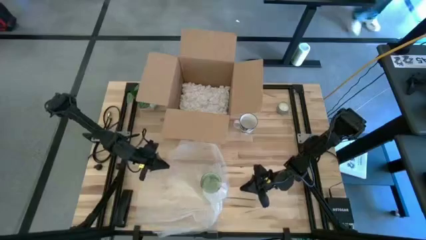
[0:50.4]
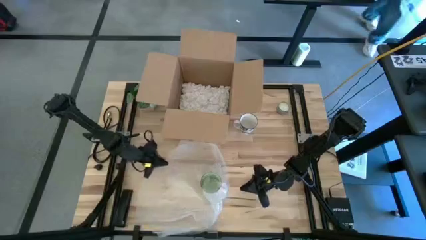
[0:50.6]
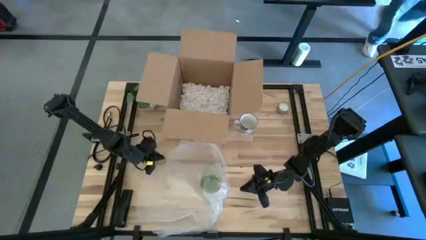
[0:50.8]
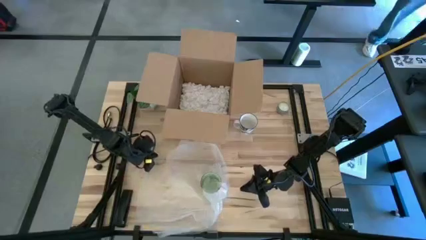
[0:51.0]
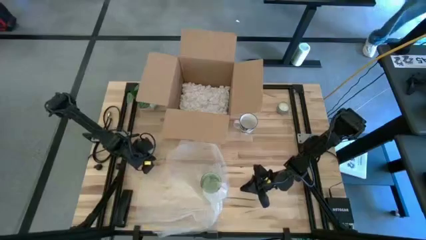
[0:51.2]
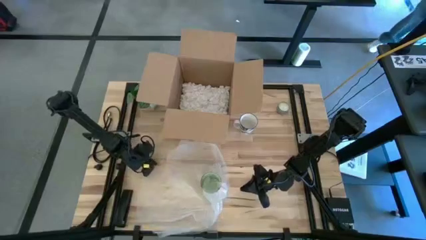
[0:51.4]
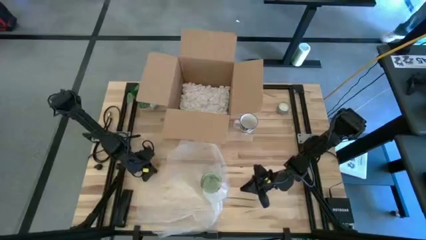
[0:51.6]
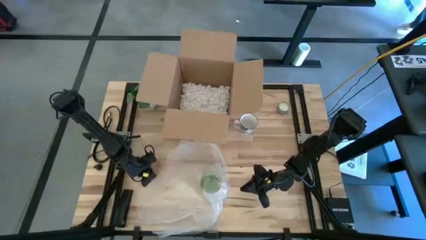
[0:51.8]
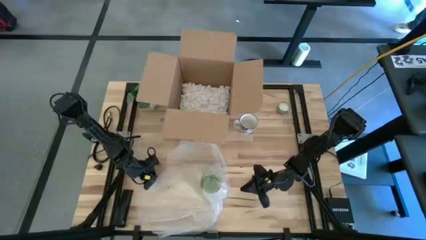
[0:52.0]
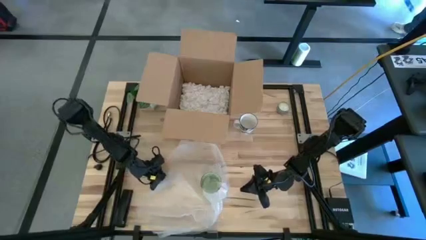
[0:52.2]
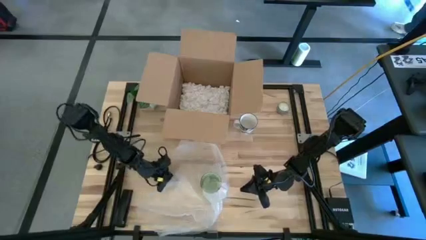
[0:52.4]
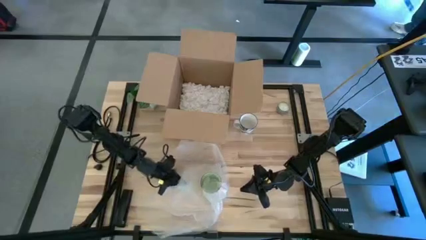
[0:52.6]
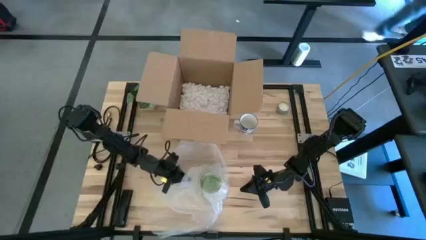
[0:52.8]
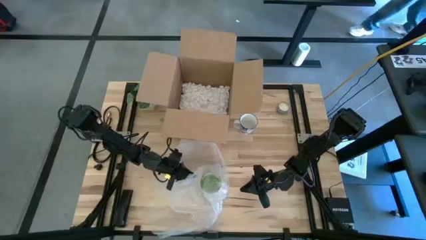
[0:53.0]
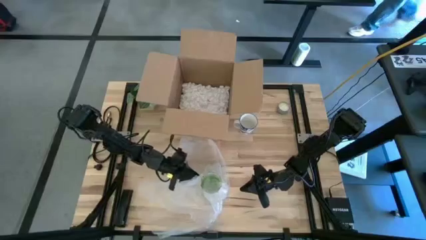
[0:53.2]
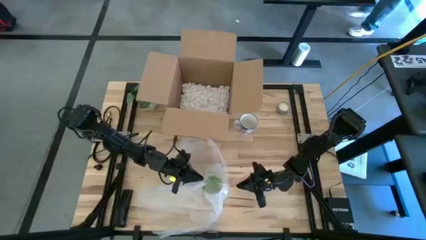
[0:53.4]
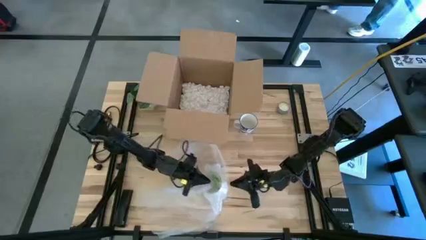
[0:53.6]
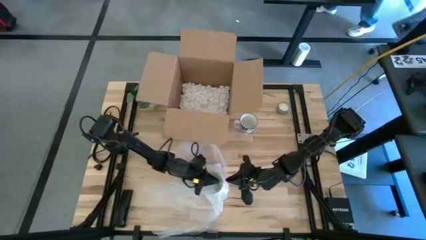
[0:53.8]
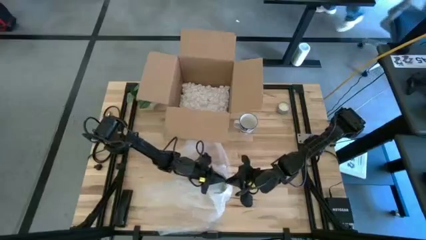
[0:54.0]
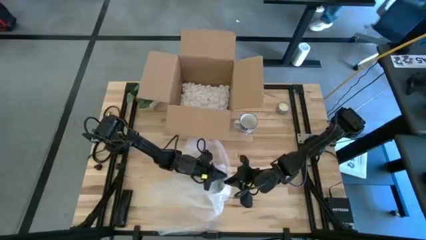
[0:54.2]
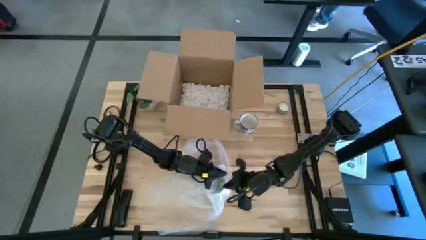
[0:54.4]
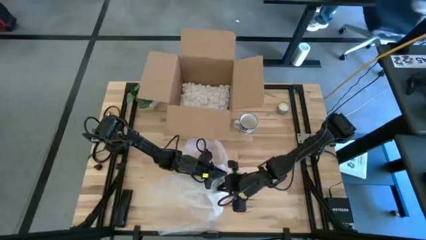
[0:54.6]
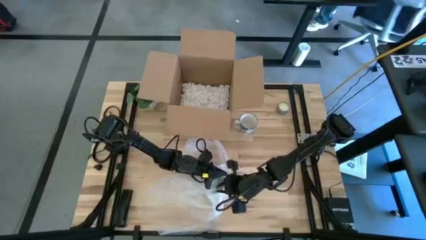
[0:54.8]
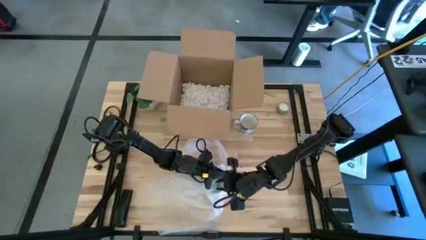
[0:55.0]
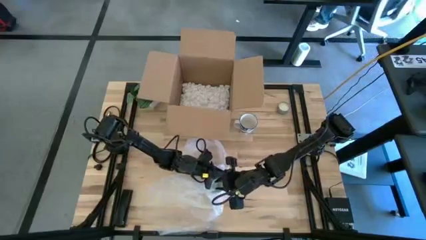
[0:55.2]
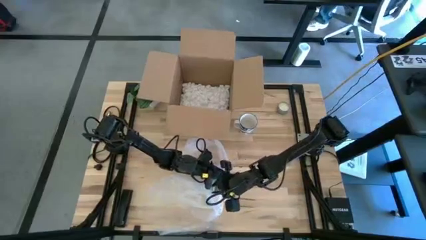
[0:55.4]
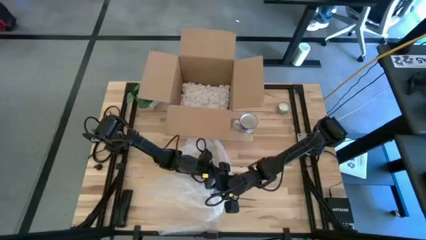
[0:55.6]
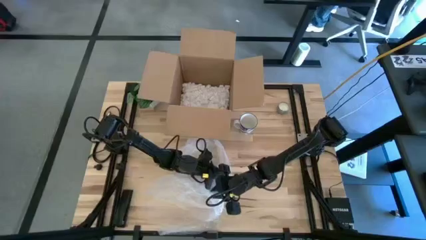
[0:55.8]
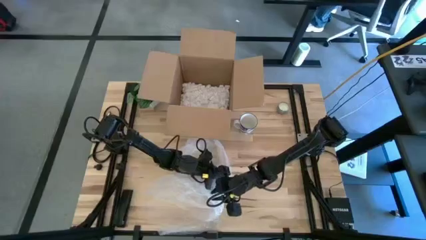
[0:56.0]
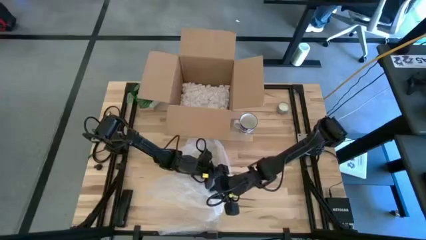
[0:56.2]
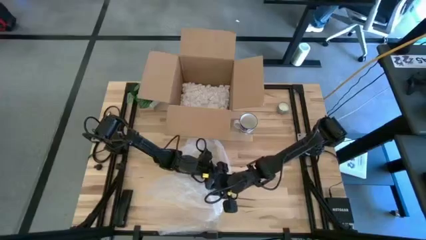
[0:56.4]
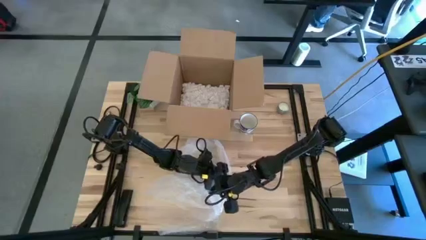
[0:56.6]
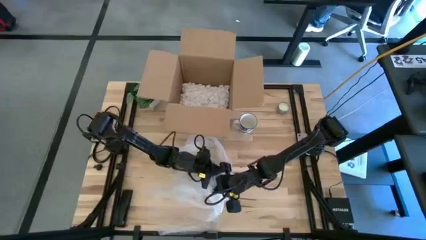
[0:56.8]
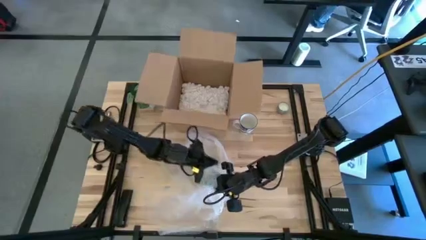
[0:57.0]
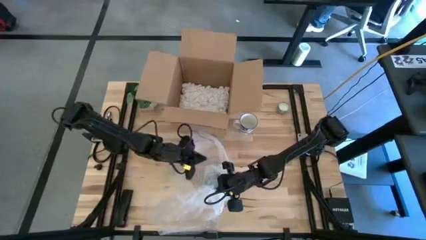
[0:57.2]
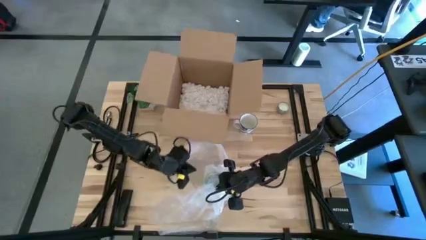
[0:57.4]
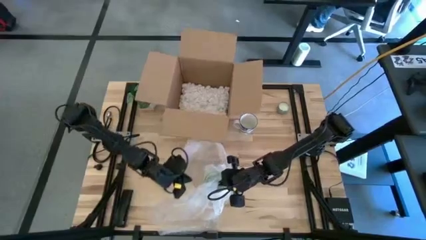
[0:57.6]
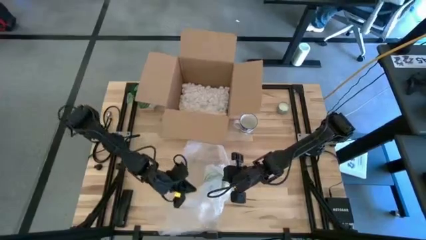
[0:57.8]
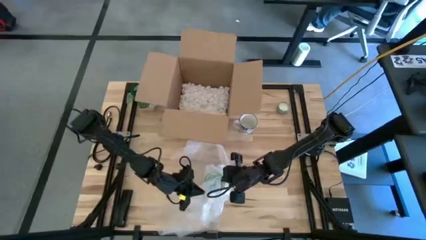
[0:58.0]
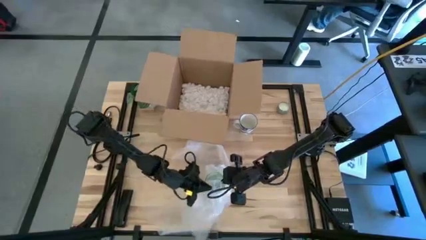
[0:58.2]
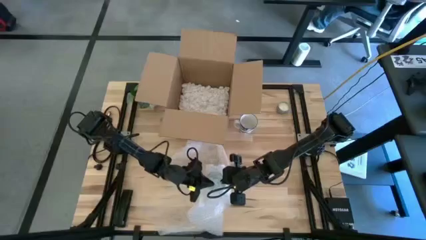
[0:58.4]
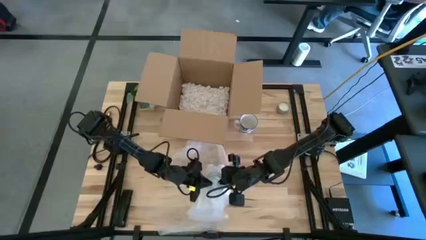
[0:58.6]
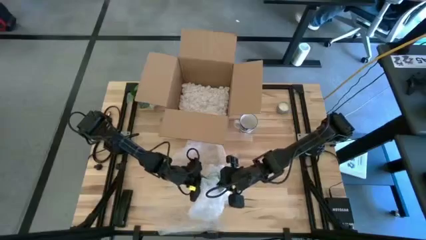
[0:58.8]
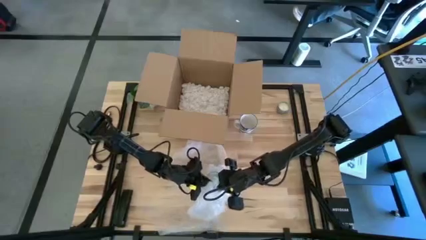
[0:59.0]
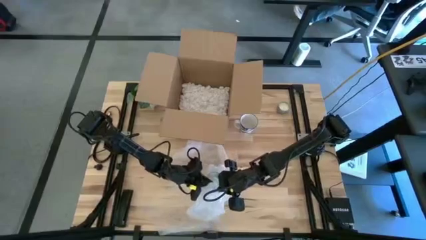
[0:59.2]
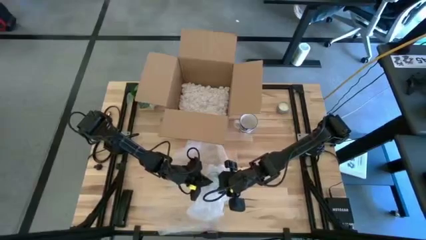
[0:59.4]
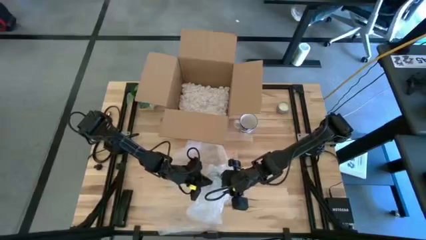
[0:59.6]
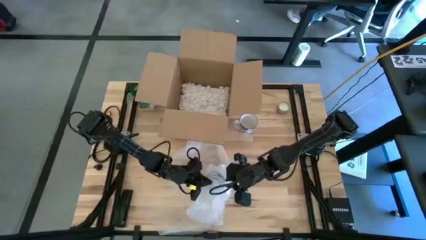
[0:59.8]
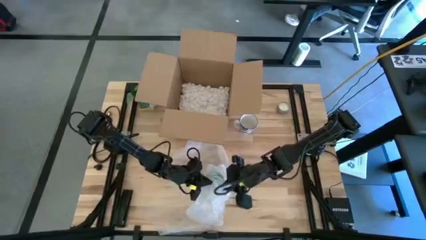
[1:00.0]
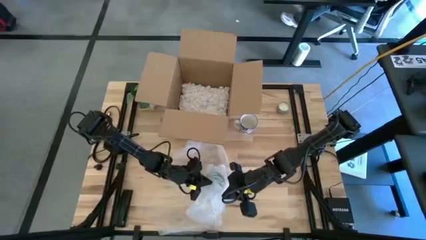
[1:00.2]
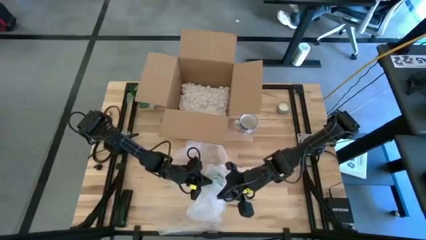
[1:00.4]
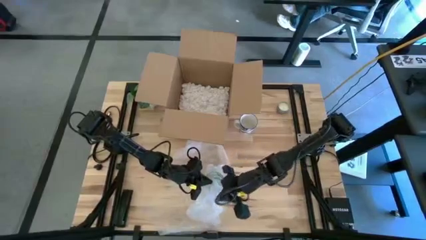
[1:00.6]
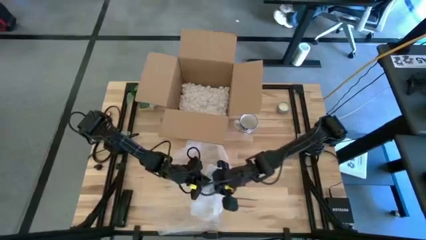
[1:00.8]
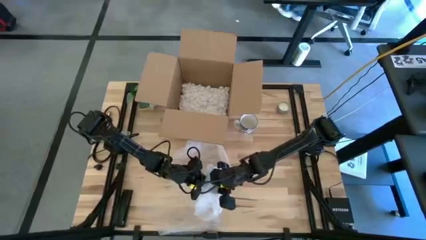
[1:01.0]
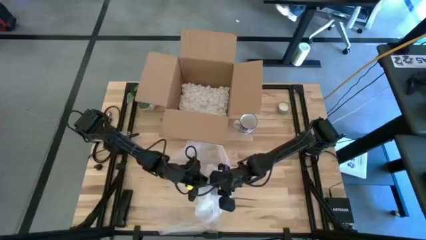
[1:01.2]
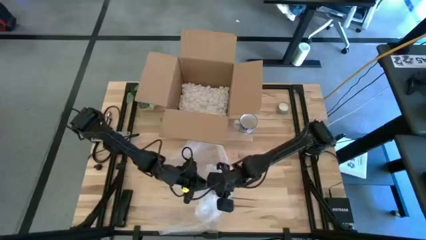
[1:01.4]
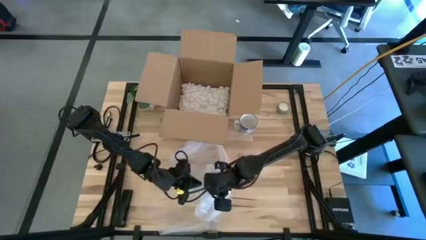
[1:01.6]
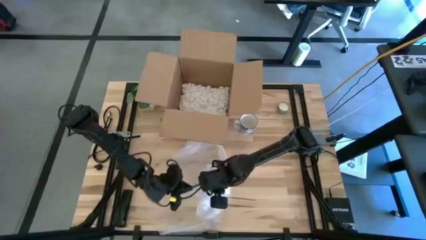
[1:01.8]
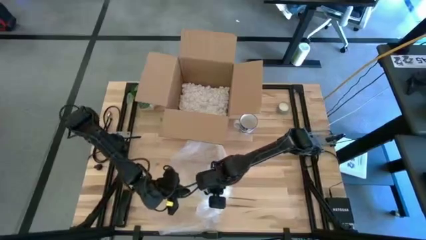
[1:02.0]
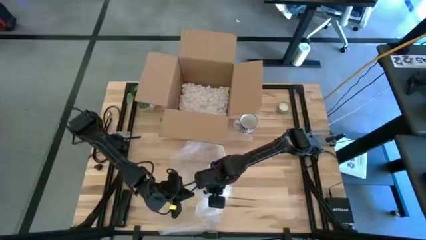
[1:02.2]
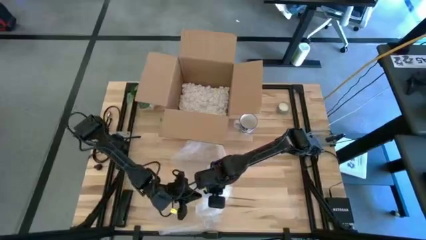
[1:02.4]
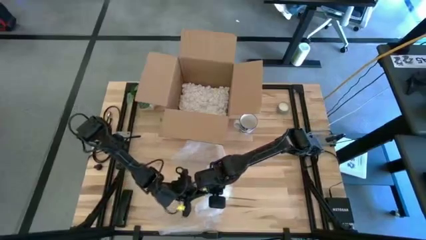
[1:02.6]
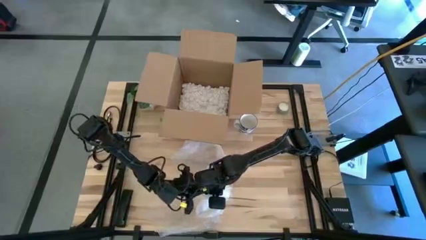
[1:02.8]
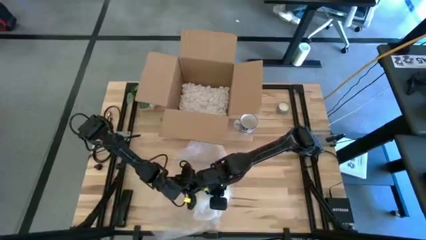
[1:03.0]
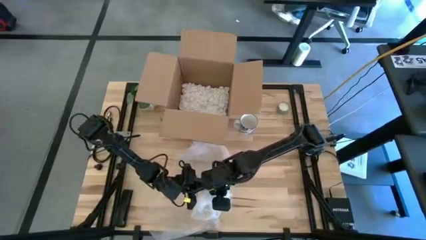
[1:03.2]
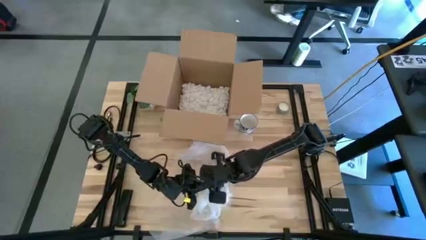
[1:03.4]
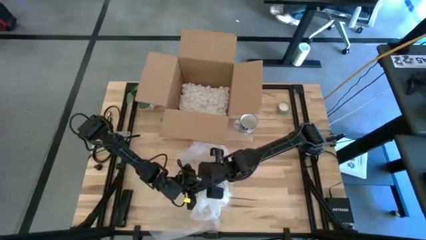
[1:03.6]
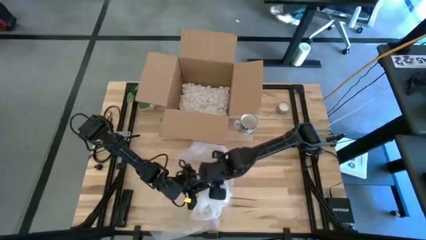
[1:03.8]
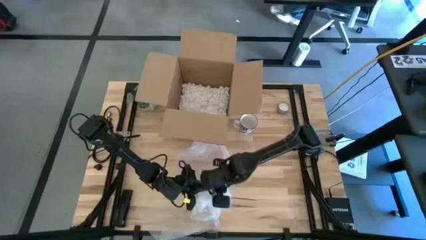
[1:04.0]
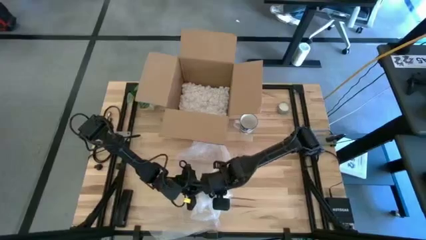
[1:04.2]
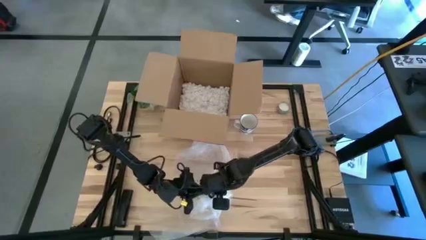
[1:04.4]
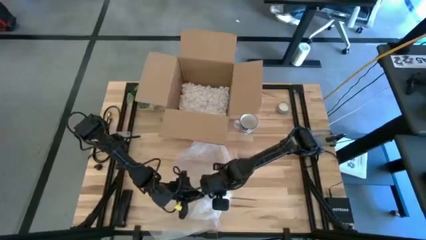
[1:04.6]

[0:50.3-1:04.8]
Task: wrap mug
Wrap the green mug with the bubble wrap

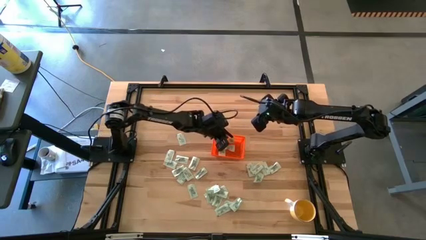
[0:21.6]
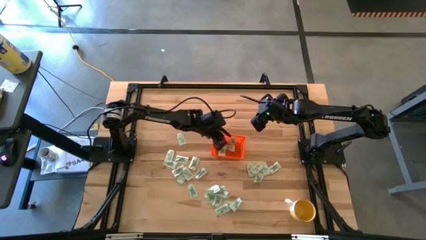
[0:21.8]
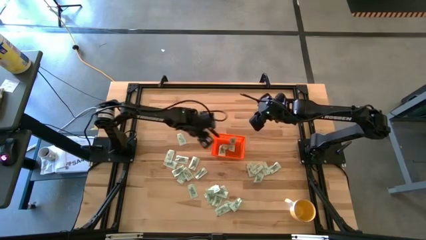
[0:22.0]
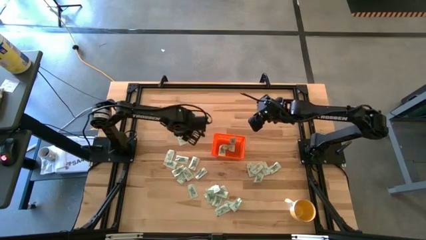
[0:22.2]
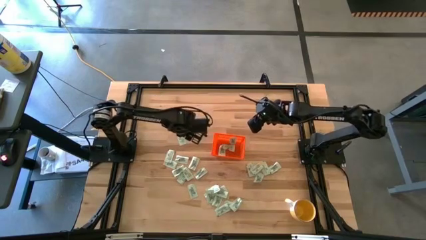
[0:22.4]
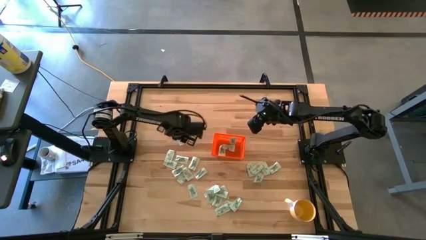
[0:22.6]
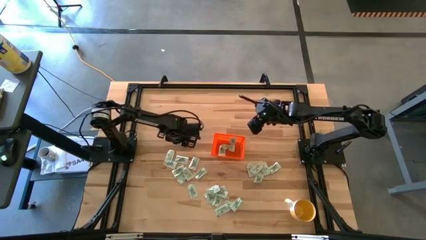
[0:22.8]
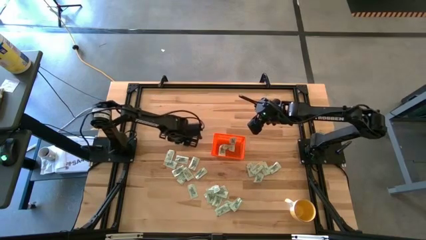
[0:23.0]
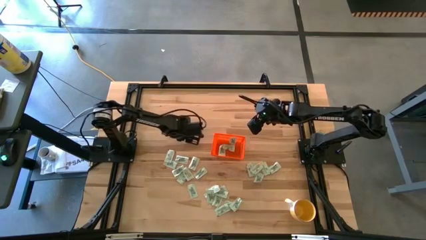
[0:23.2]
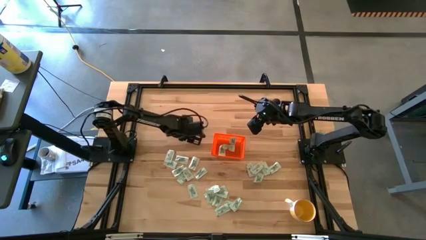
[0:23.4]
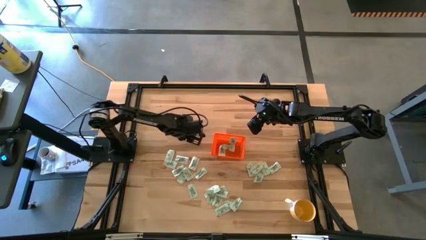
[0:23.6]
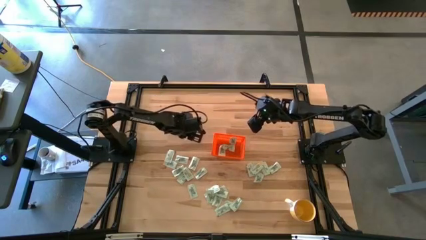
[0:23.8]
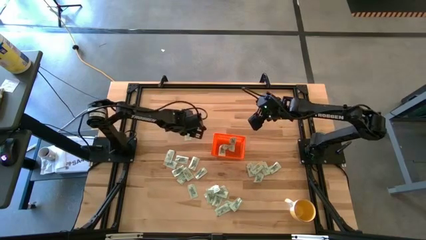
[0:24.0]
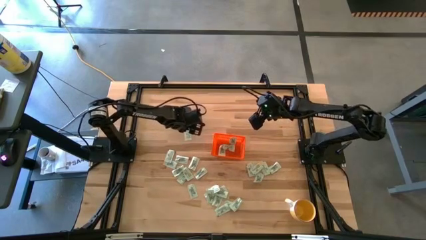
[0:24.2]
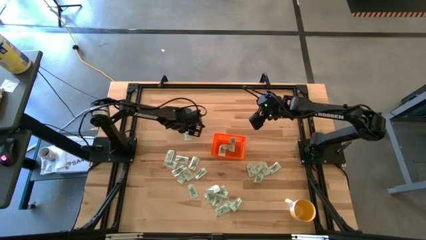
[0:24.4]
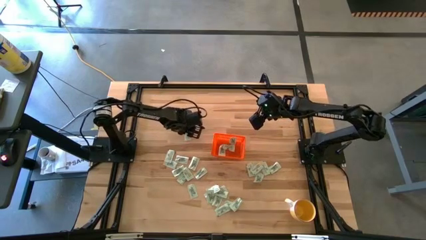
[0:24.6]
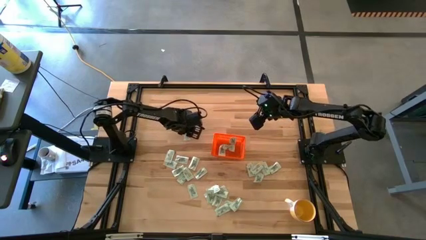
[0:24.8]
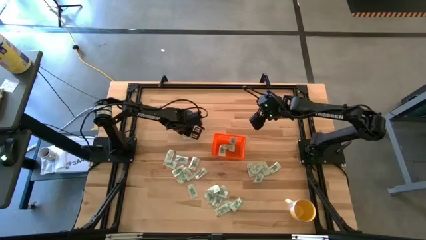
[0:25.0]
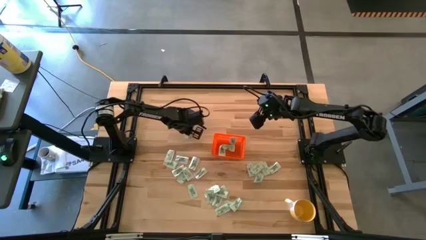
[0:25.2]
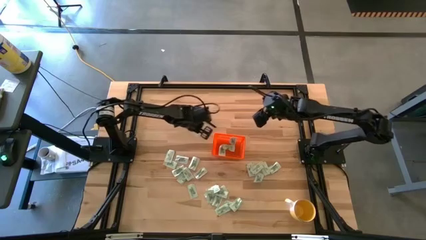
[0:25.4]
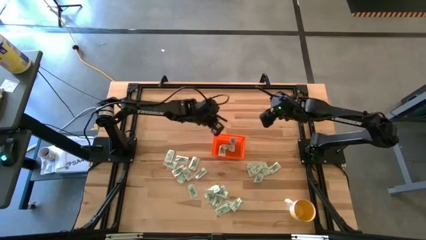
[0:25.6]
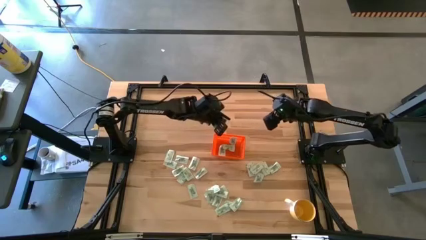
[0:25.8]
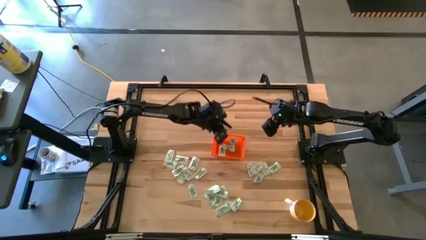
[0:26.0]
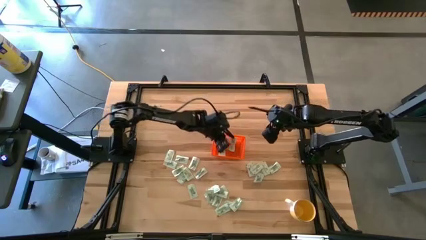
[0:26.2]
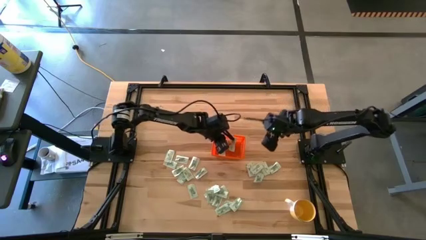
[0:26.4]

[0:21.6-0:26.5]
Task: Pick and place Stevia / Truvia into bins
Put the white stevia packet into the orange bin
